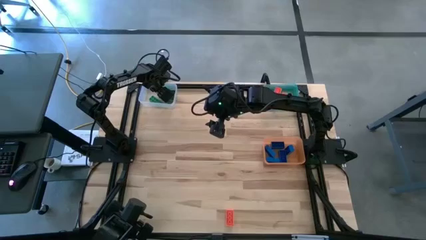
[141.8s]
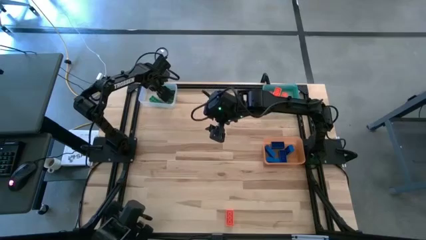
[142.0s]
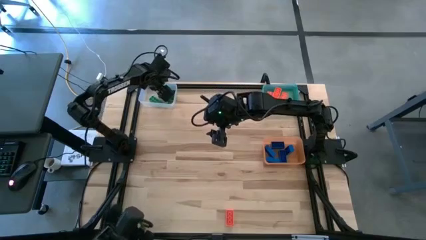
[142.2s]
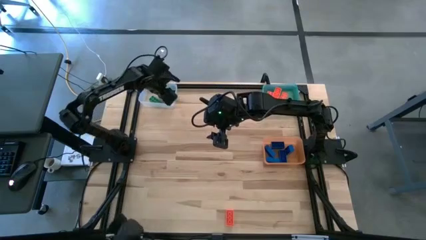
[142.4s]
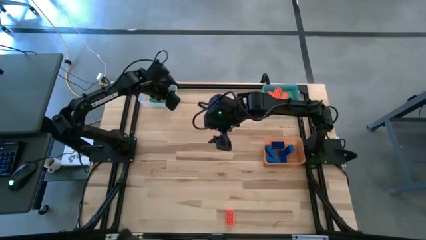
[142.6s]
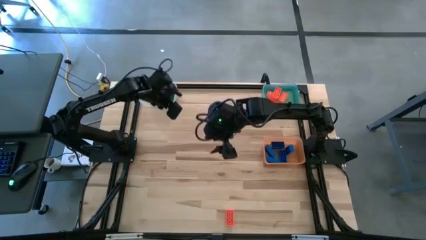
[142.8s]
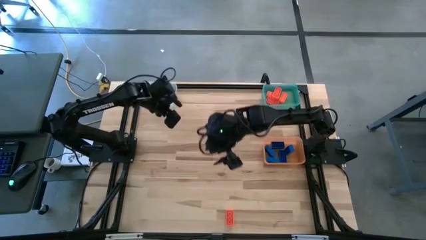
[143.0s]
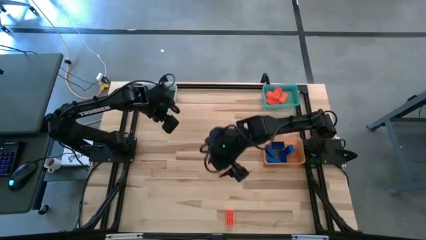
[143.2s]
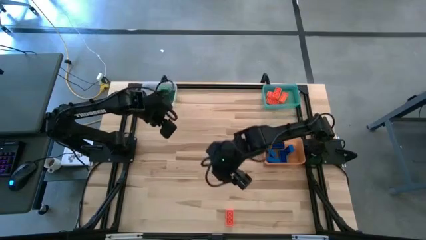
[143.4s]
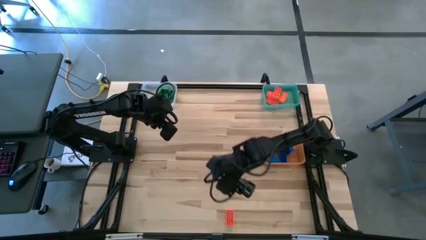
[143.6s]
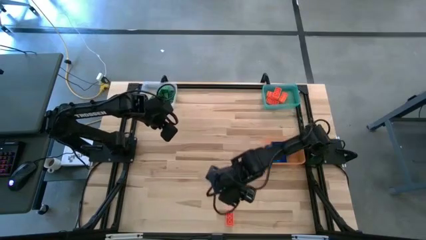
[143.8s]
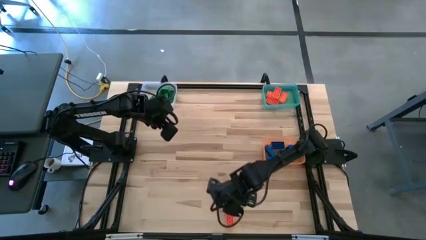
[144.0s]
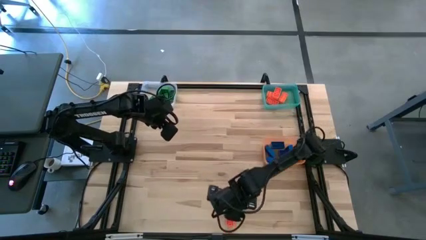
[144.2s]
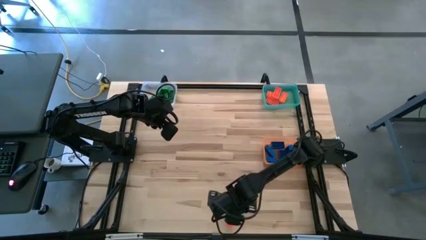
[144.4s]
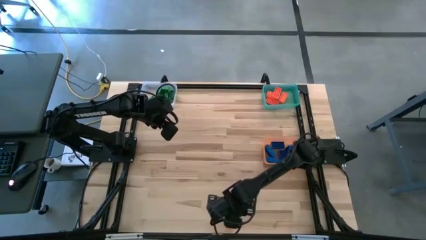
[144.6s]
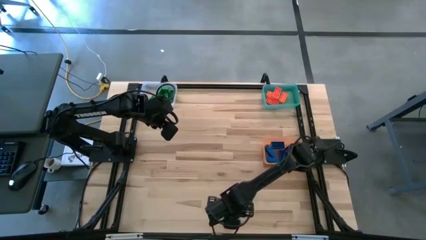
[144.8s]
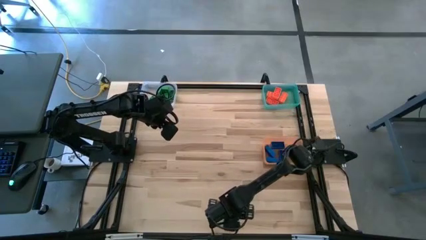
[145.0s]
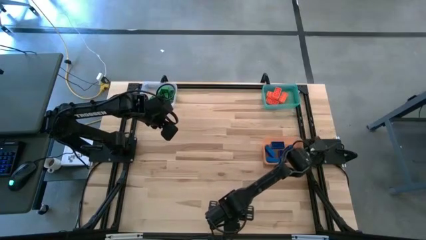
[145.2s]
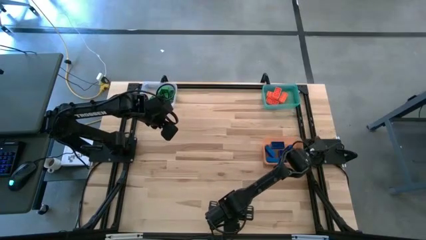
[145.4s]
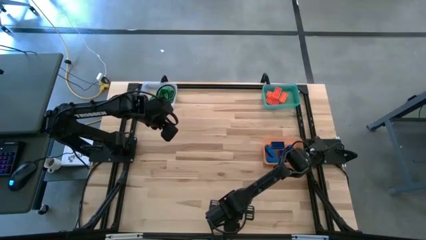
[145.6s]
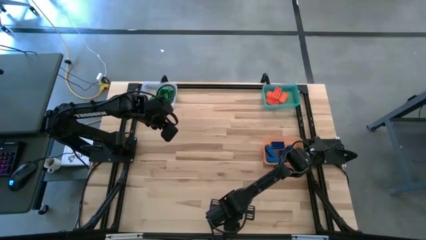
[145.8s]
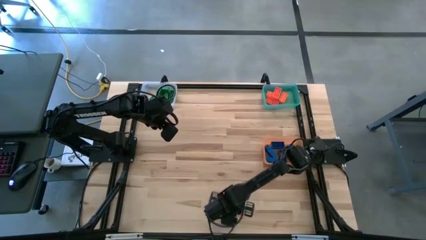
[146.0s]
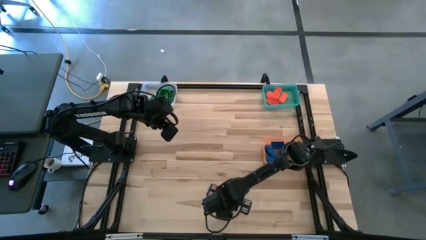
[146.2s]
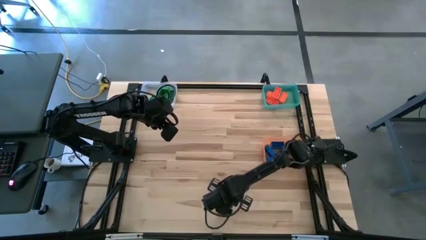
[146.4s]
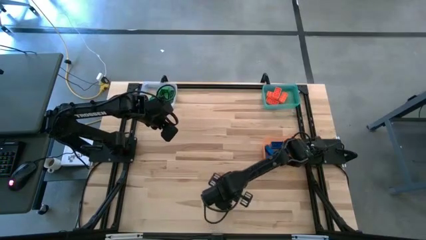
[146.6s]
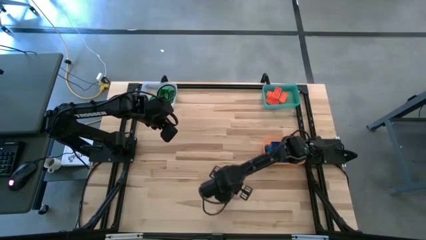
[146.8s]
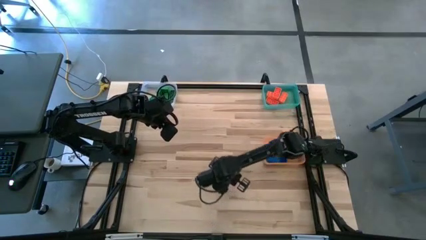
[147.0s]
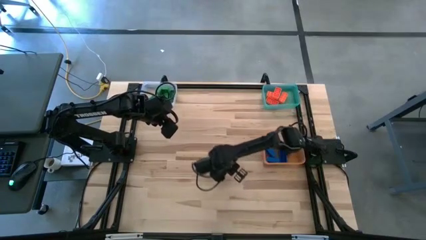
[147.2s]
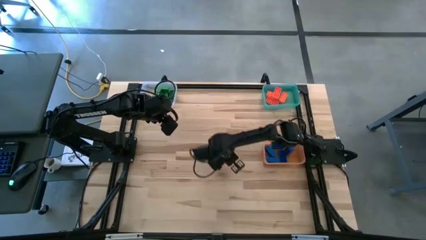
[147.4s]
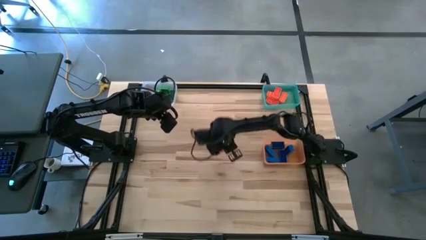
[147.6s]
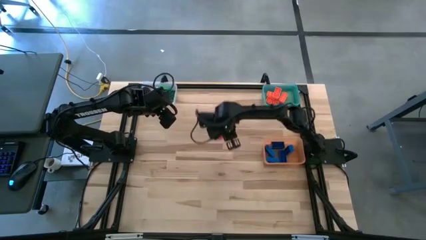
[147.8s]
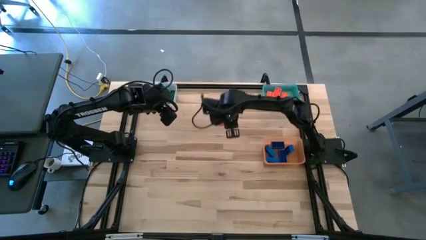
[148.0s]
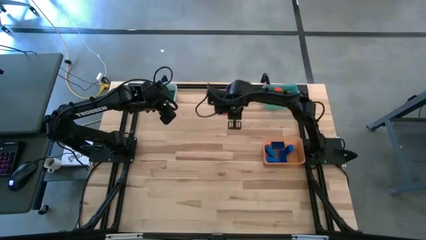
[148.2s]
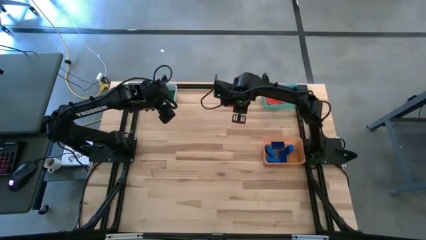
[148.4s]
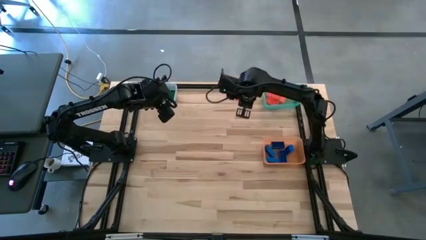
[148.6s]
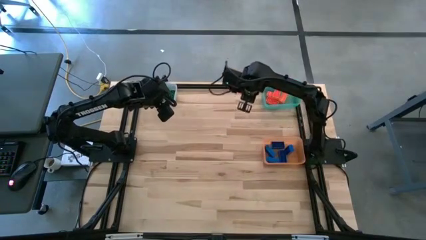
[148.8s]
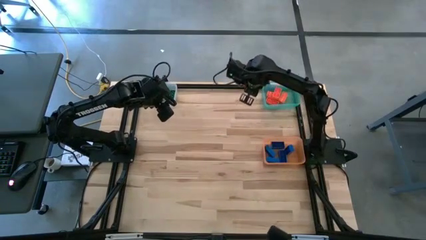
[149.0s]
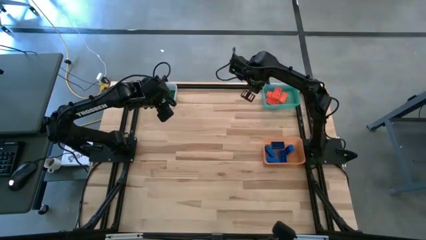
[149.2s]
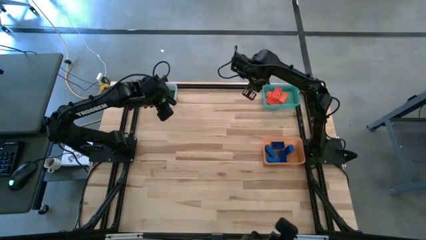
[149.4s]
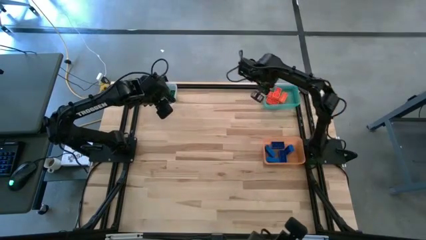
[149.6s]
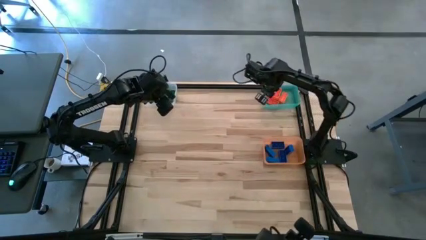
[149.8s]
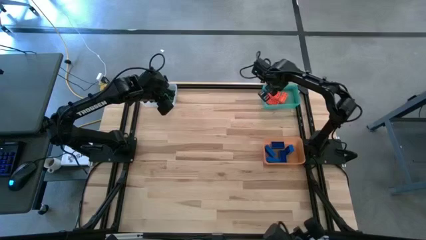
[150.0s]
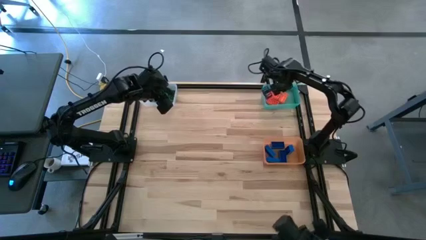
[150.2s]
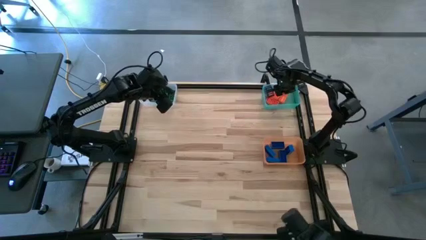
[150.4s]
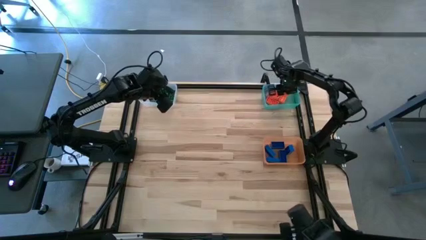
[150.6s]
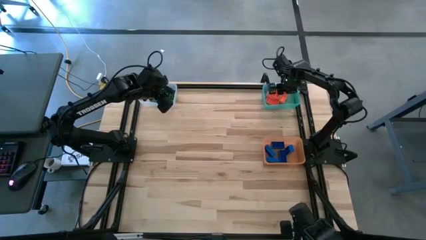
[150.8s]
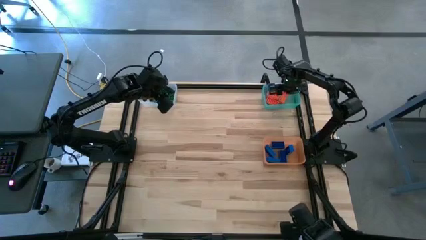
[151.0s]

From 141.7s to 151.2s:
Task: Sort & place blocks by color
Put the orange game piece into the blue bin

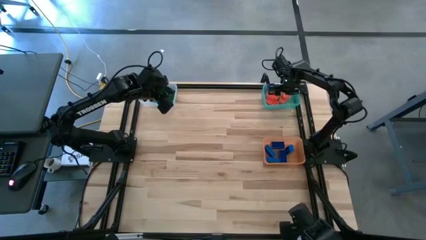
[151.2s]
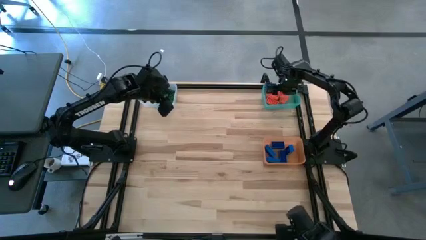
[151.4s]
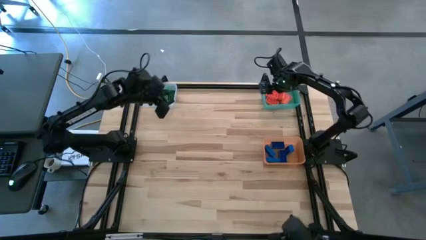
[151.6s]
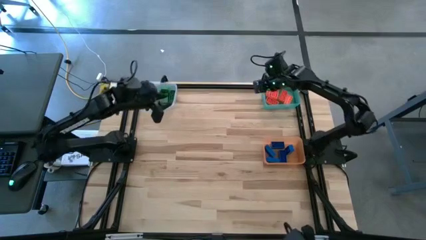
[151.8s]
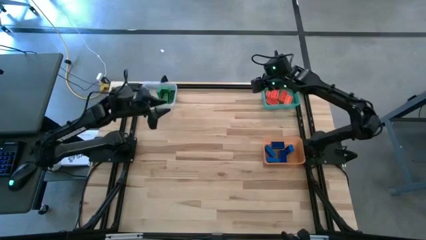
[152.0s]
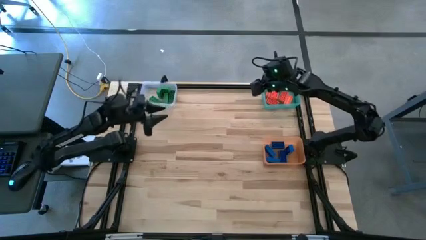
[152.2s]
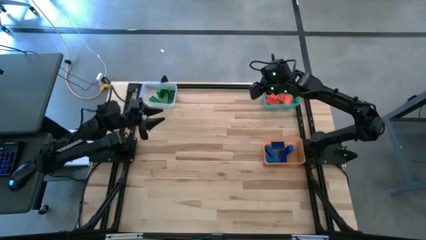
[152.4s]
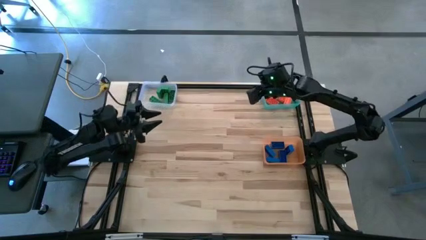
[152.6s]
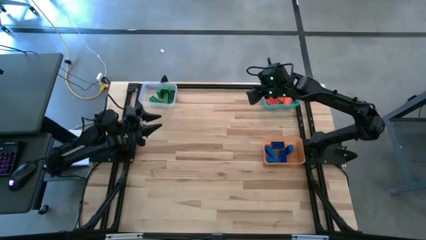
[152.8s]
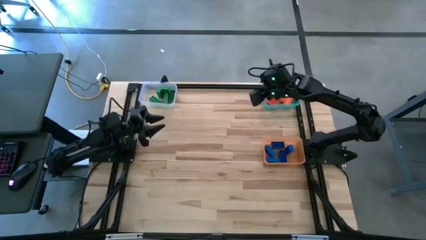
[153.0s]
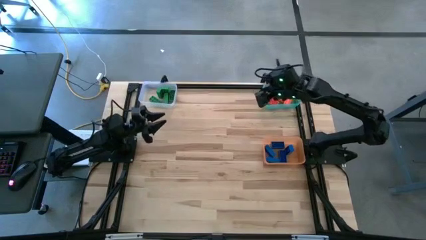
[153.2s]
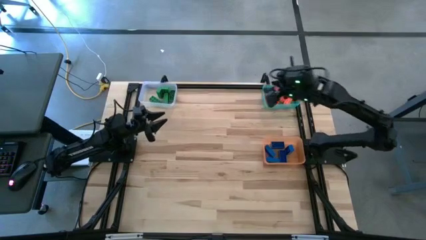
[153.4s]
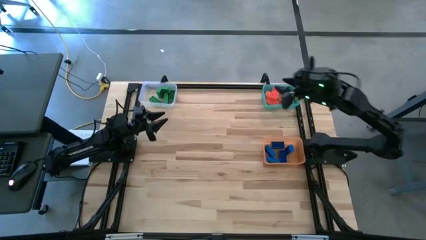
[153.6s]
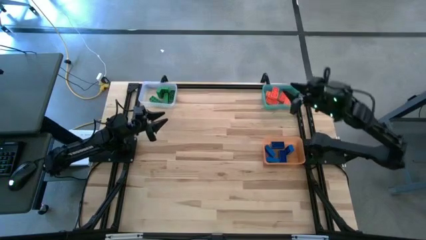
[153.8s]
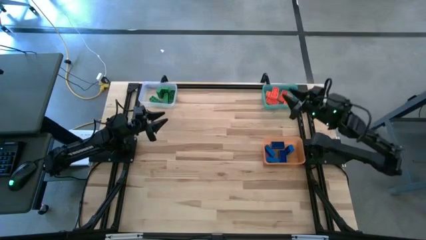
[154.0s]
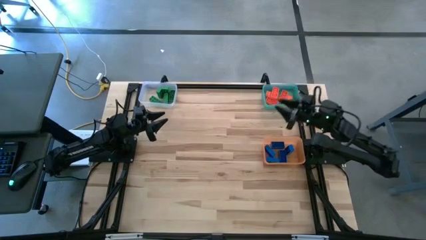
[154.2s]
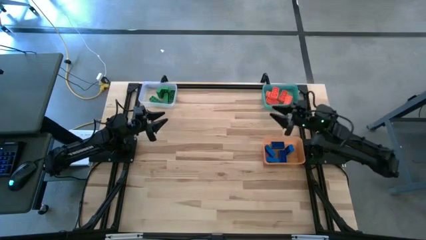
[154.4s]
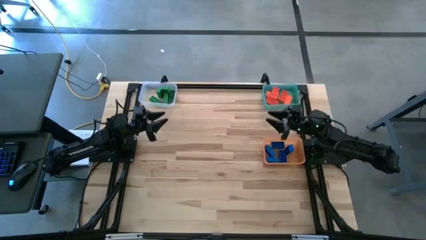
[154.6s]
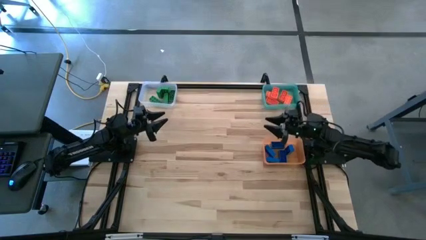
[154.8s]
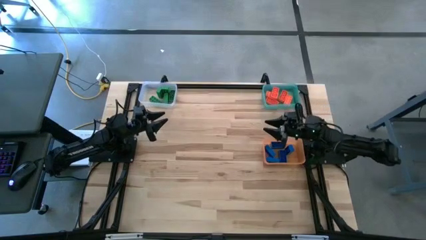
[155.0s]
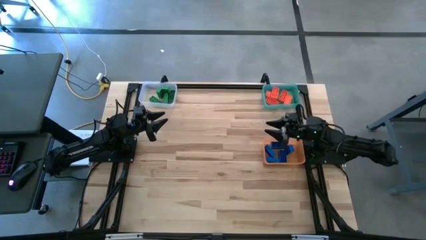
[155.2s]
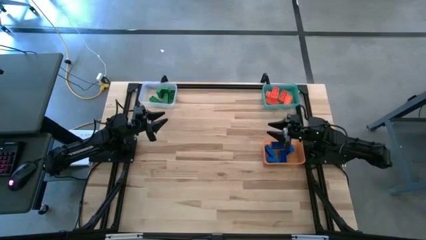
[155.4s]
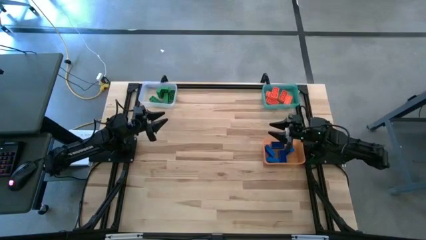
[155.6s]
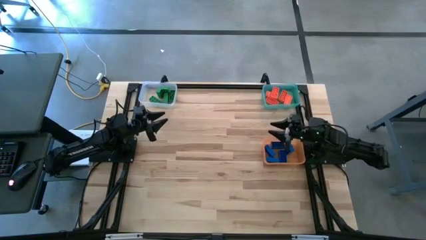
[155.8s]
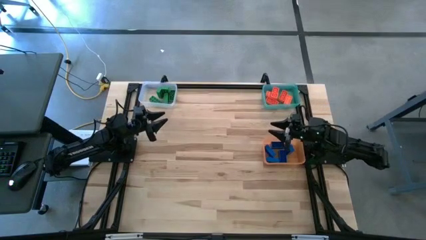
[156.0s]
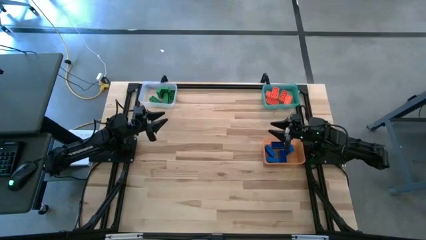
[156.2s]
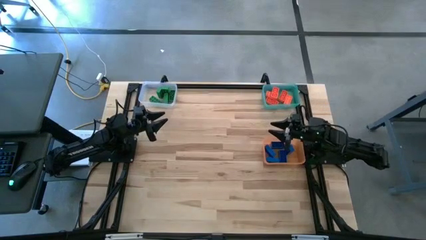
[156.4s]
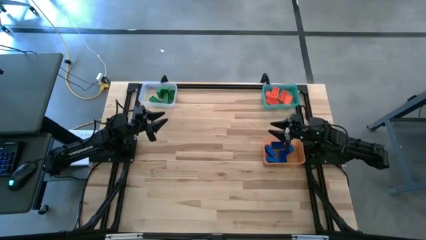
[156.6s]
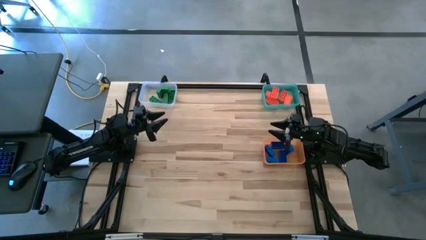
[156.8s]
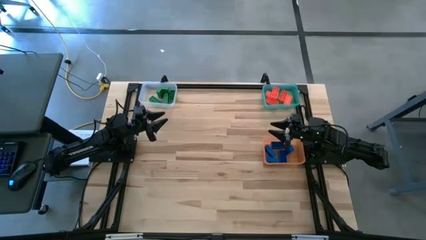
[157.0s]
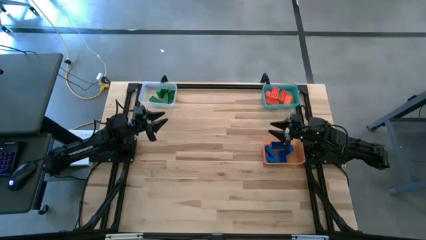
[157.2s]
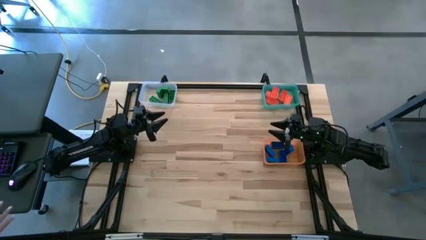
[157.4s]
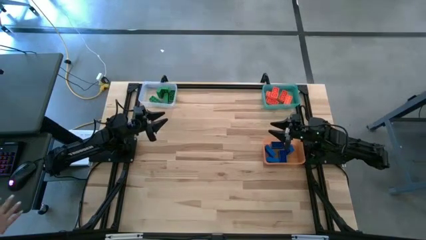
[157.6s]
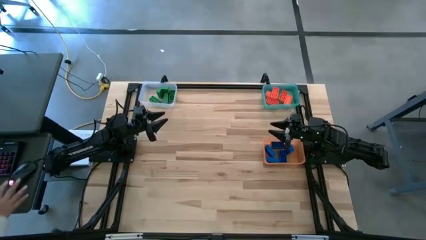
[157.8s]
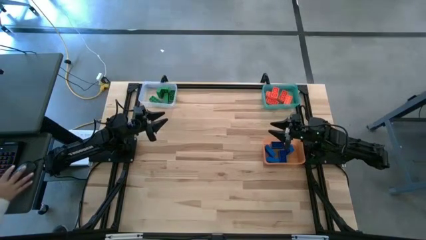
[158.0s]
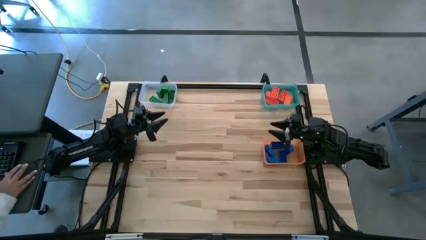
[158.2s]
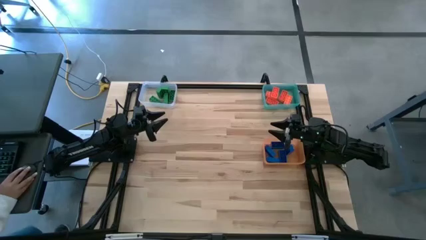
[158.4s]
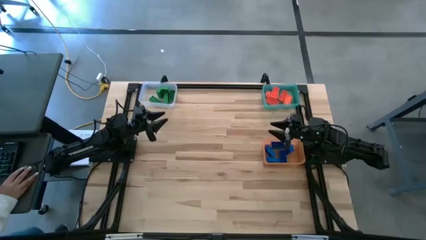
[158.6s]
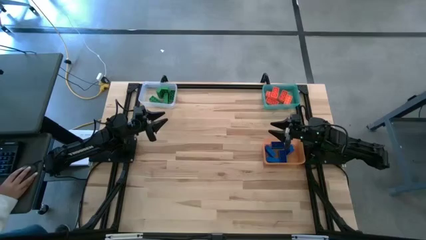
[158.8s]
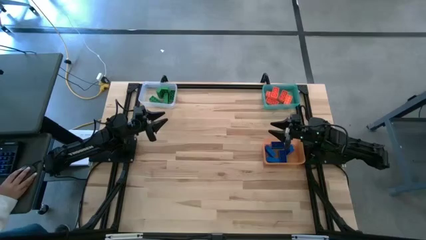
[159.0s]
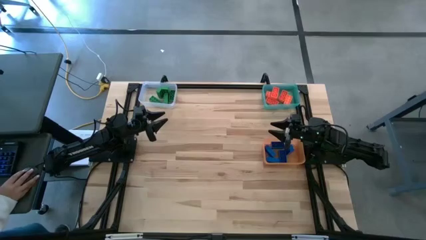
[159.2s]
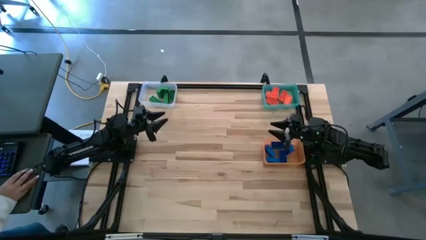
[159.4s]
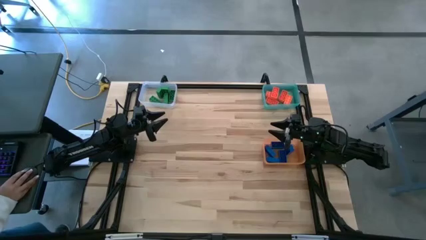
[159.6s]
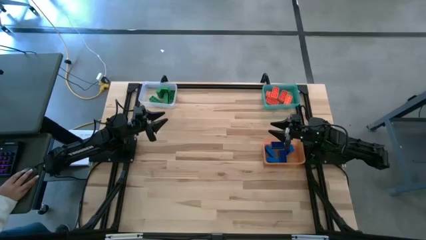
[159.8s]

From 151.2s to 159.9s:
Return to Home Position
